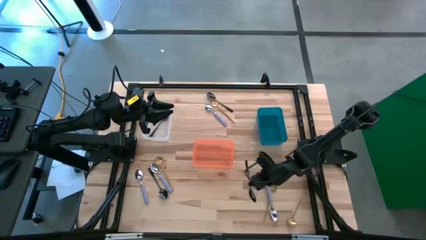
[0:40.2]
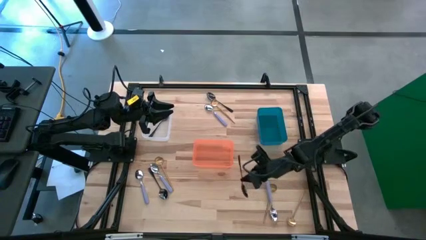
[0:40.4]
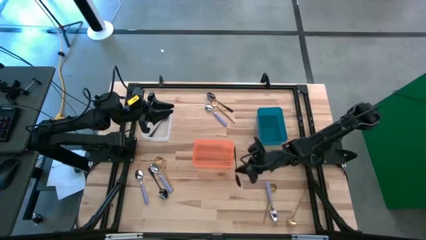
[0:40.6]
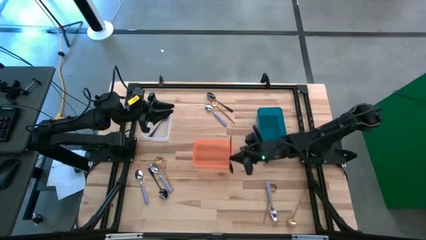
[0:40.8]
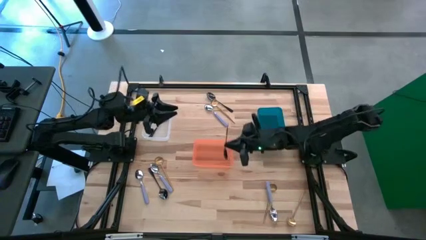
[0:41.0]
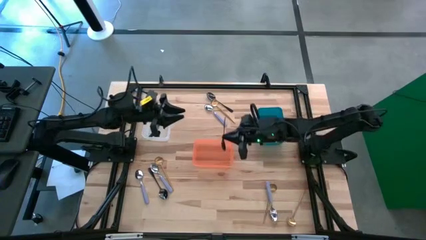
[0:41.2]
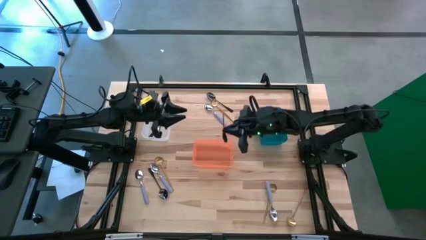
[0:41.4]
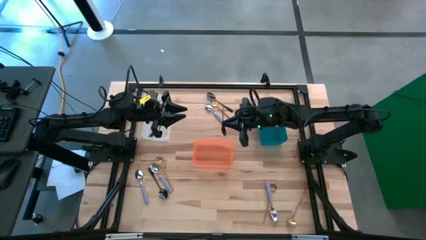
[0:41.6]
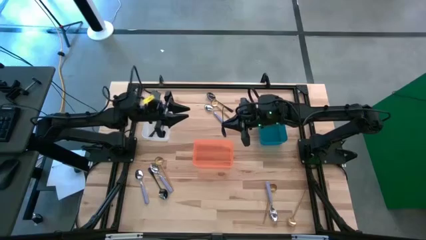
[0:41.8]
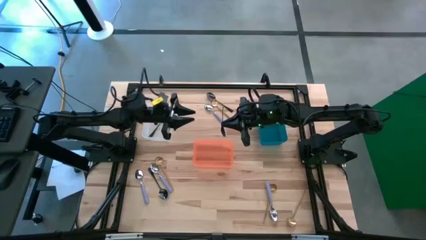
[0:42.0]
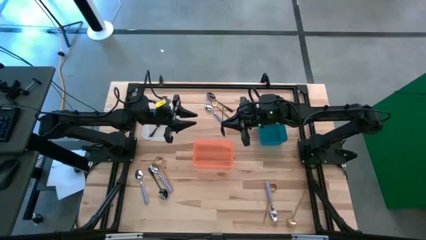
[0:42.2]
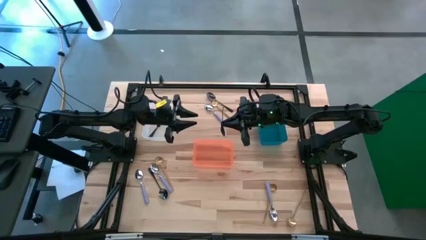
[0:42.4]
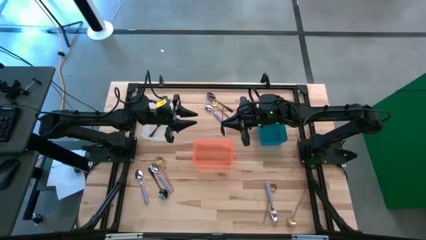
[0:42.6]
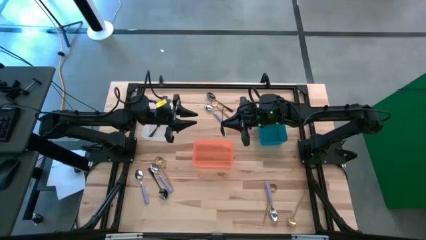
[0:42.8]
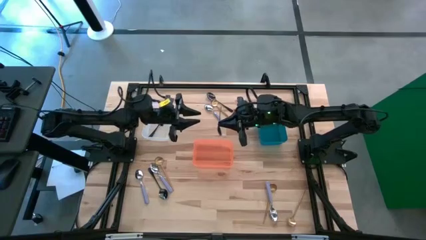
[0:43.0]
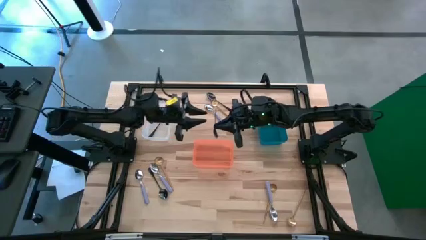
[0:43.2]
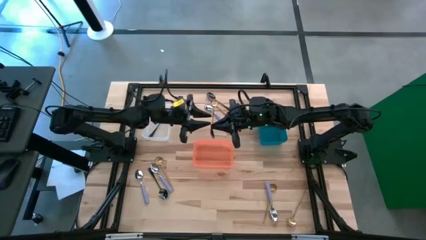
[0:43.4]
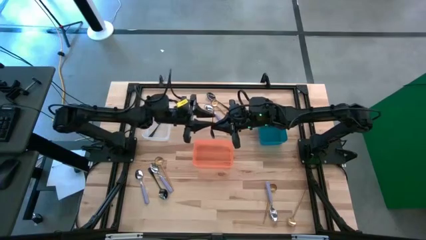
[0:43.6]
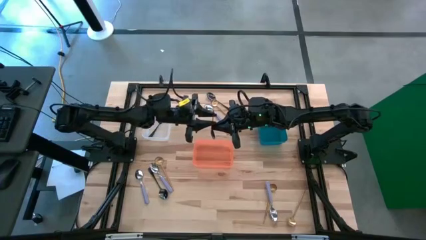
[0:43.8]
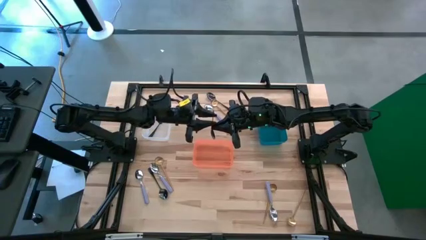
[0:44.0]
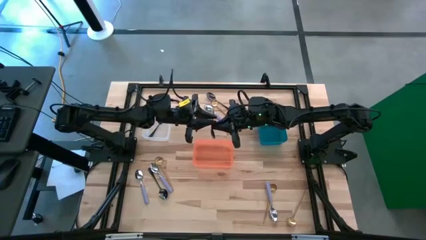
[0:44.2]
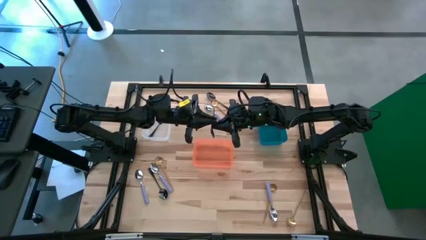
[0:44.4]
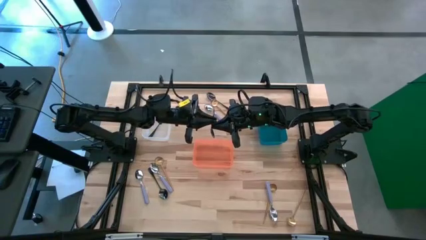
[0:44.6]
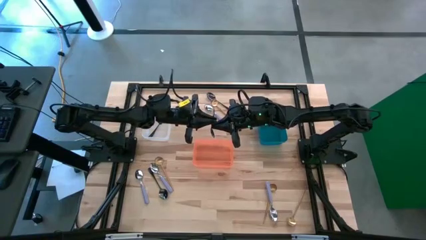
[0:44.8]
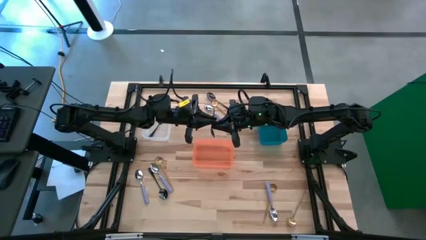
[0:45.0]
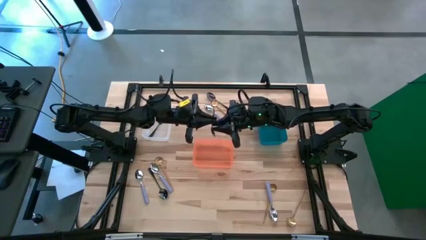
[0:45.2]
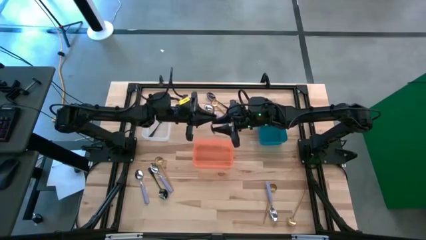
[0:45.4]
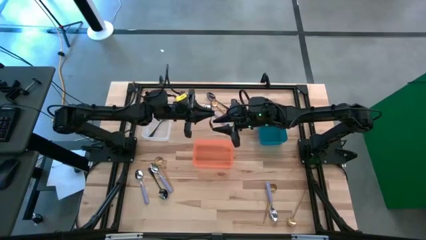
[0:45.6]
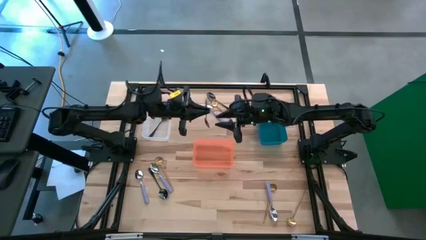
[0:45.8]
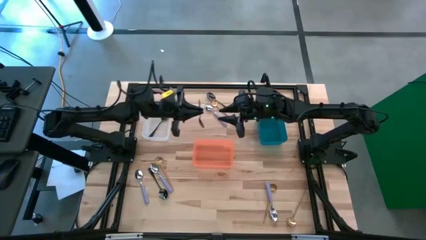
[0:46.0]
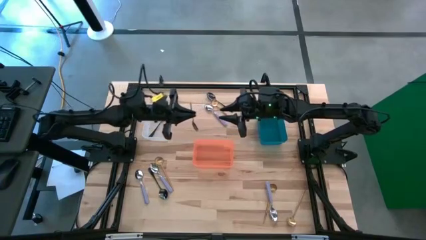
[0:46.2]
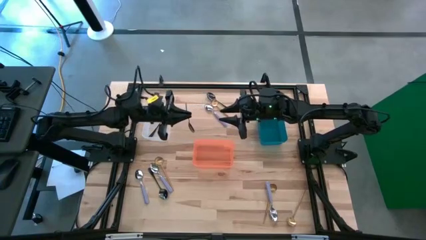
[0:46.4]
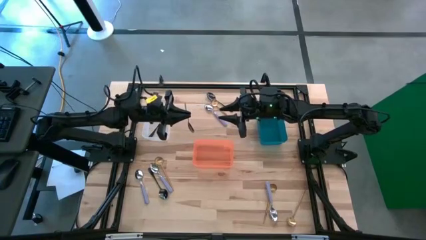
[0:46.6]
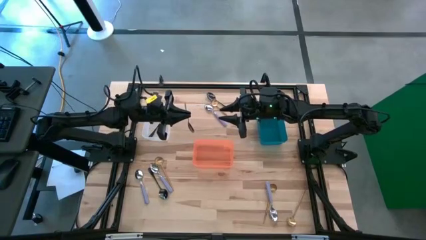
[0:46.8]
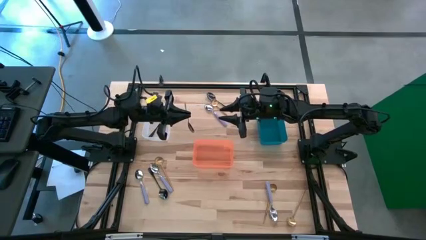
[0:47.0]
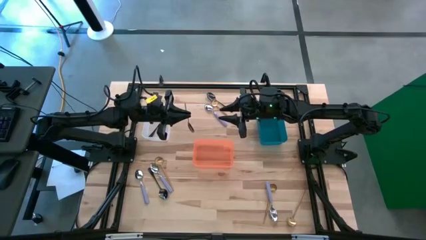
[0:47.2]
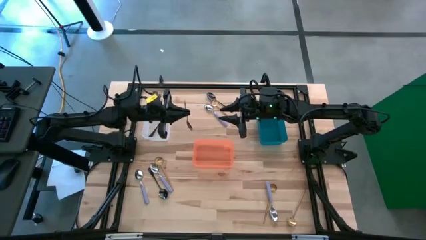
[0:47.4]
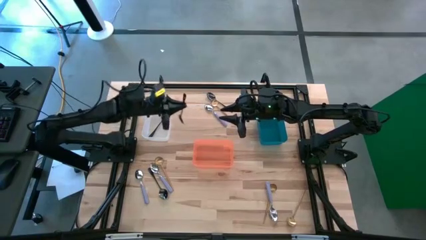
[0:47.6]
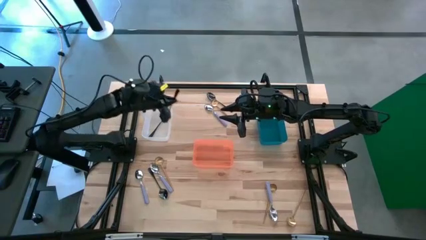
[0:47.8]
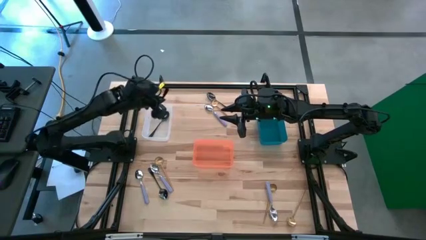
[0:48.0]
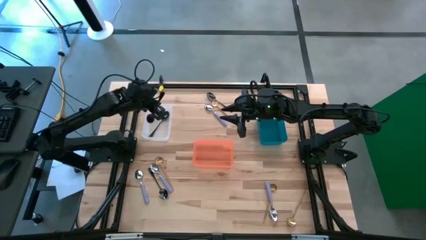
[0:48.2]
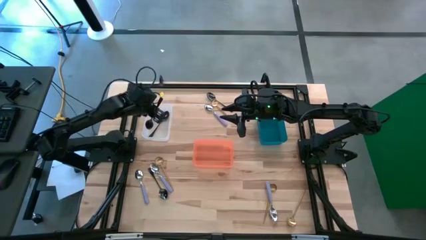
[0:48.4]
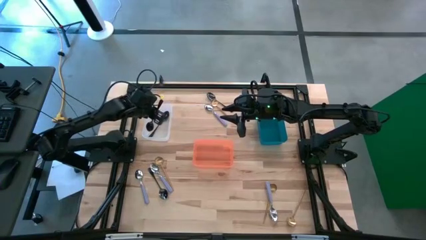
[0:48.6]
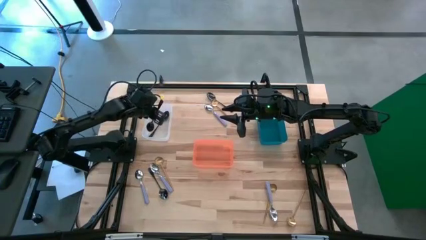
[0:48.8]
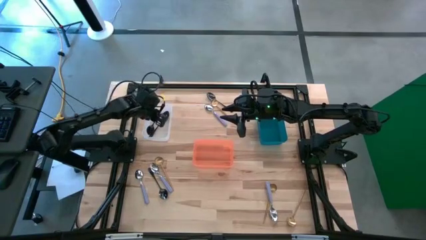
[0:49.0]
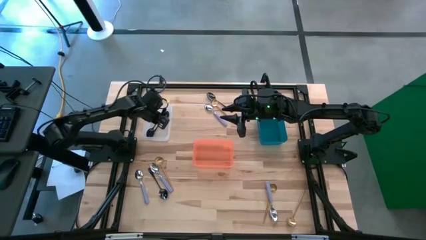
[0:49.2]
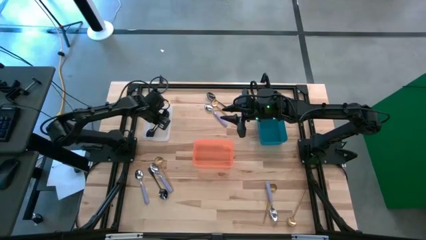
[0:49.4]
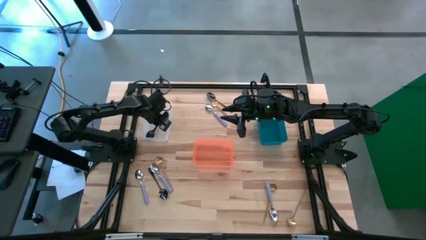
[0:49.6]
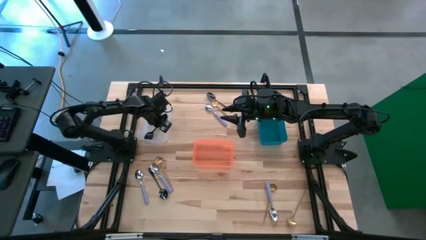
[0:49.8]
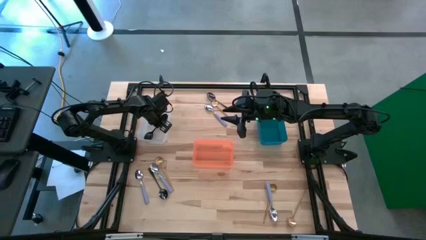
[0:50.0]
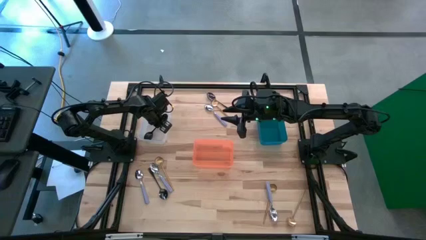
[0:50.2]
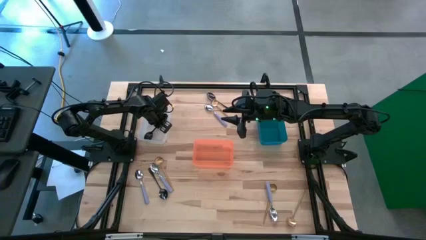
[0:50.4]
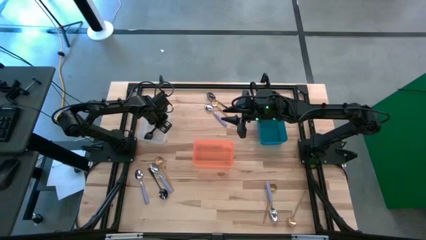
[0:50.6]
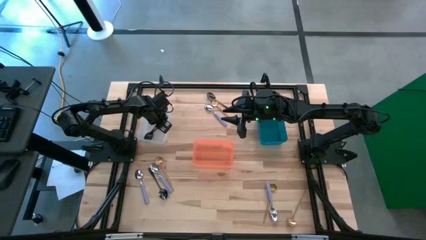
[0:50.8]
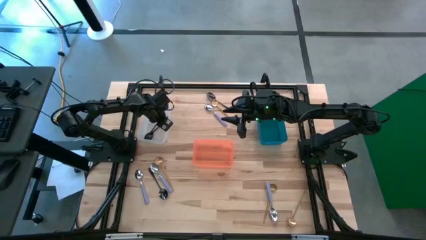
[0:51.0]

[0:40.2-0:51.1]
Task: Sort silverware by color (type)
Put the right black spoon into the white bin

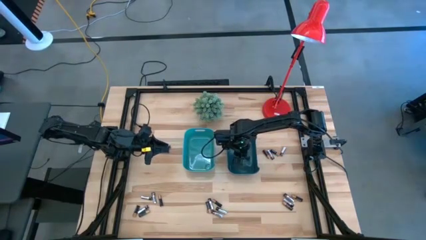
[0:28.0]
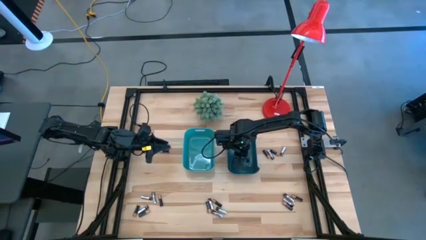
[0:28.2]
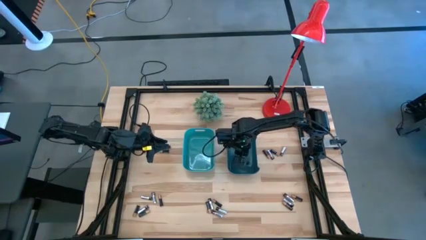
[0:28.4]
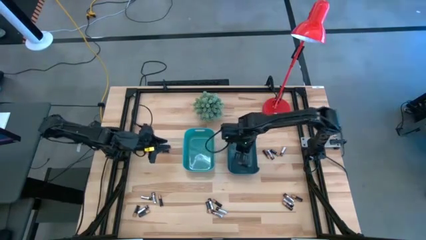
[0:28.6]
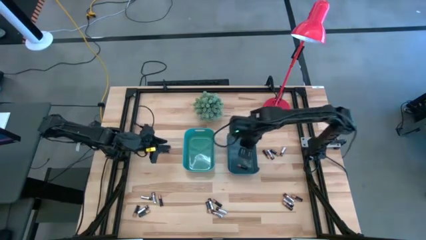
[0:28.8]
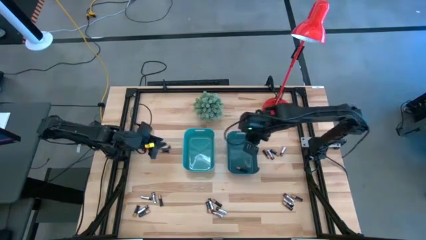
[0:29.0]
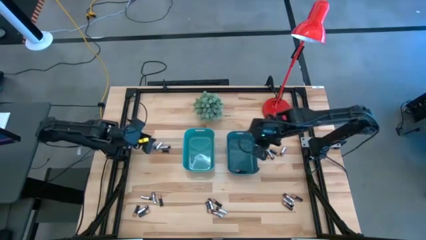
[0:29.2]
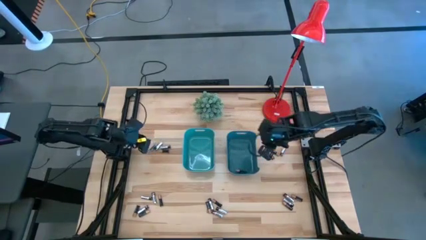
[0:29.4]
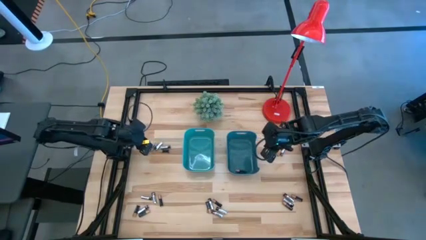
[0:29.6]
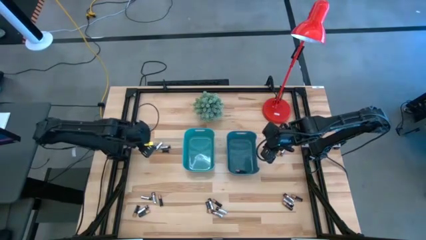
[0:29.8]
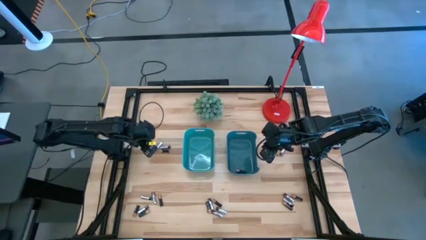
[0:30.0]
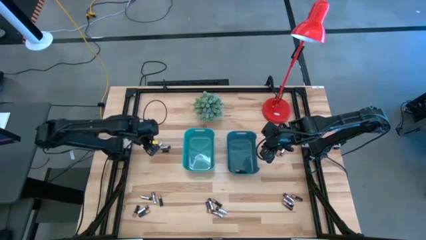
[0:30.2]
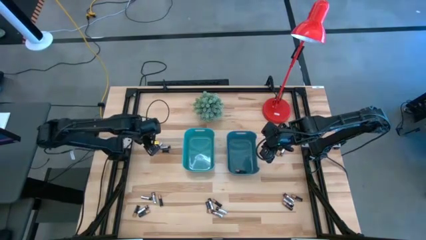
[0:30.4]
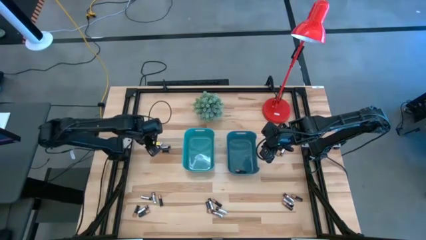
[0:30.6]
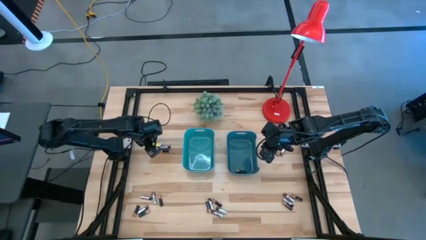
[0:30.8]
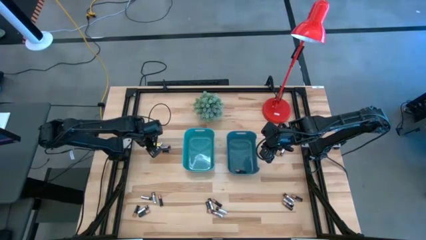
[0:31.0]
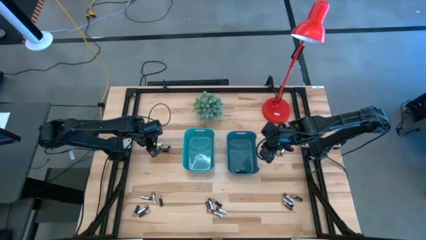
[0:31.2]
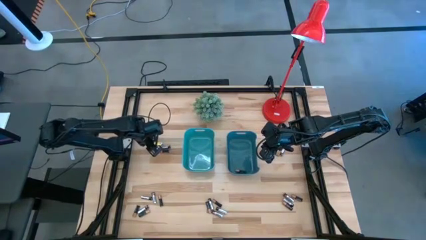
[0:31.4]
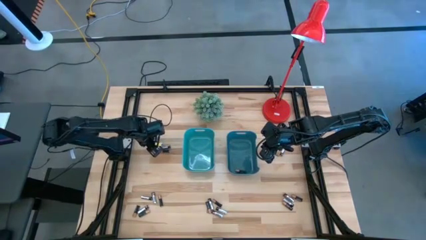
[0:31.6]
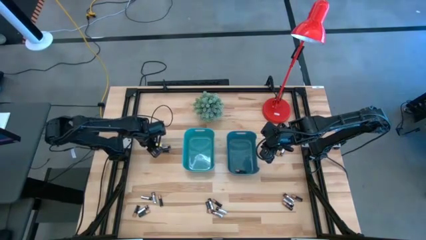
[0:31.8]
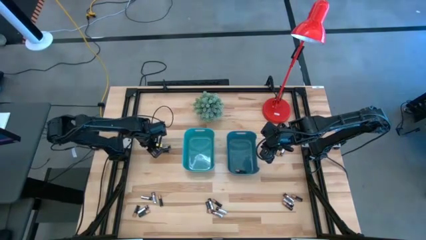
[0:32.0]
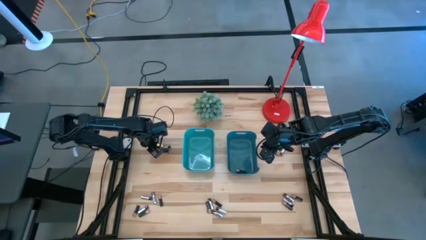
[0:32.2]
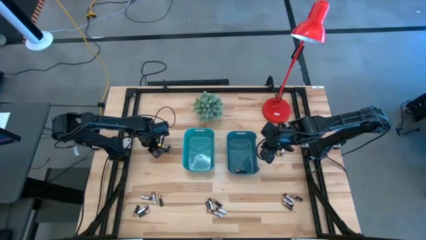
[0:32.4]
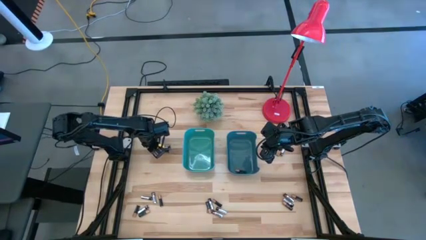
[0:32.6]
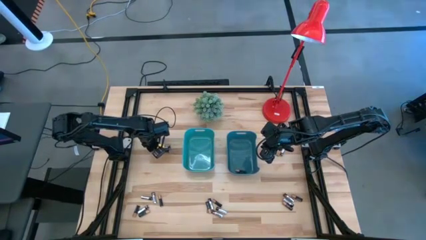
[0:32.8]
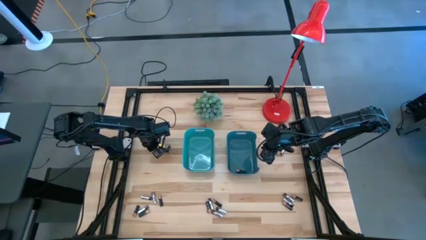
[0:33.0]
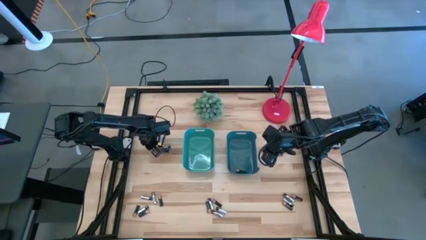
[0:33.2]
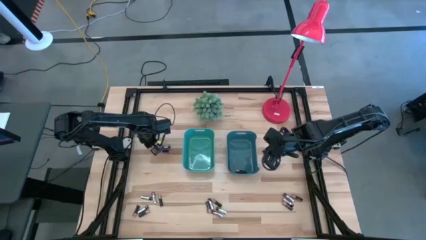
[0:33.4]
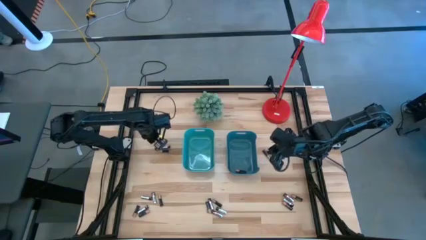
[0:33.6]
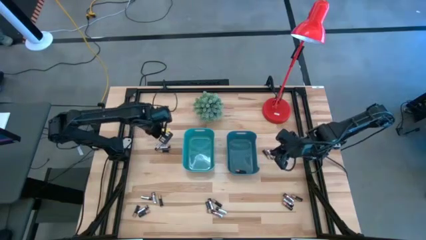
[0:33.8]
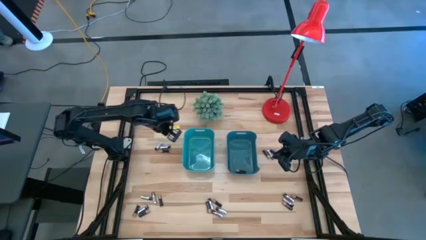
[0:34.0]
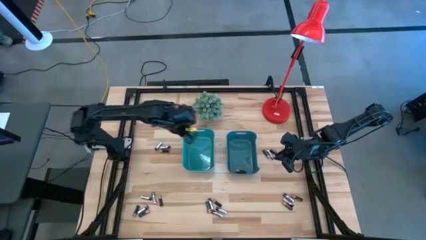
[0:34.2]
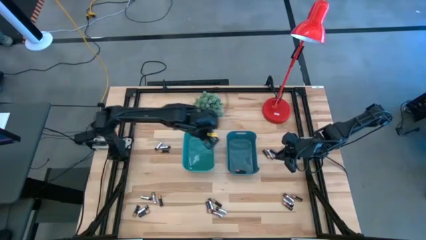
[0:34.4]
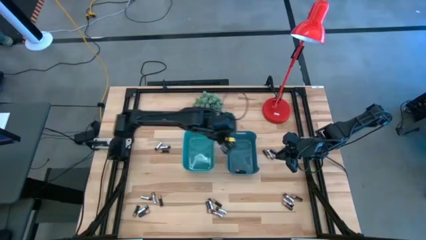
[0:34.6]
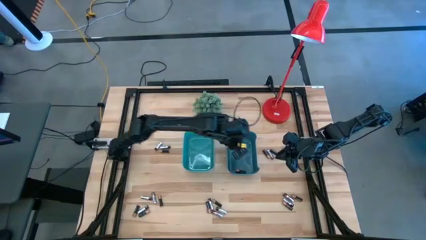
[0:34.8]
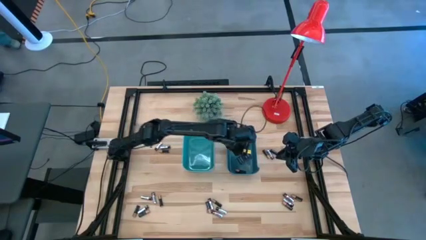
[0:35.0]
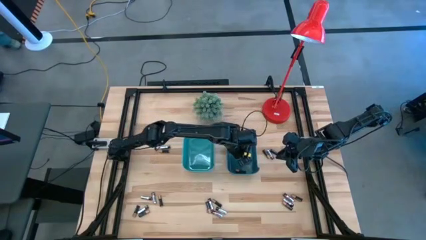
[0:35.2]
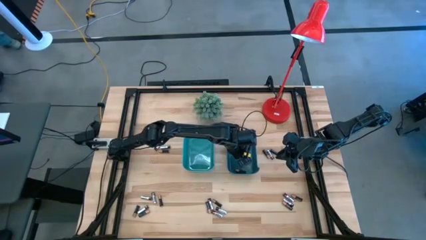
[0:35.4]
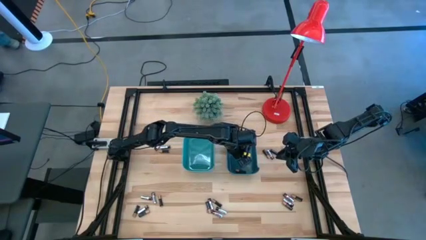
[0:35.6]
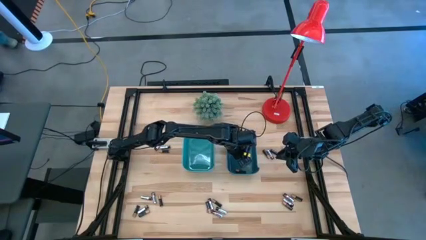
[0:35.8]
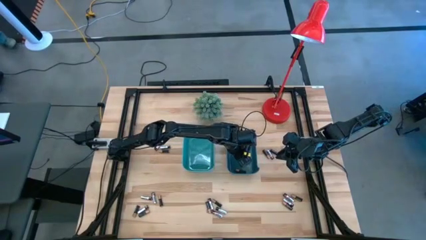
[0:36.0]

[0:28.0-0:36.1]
Task: Sort batteries
Put the black battery into the blue bin
